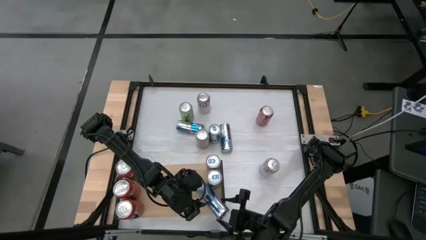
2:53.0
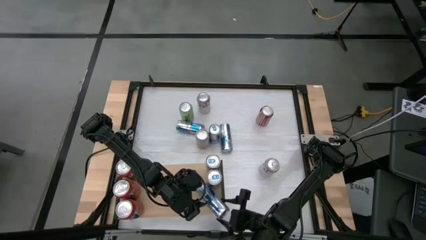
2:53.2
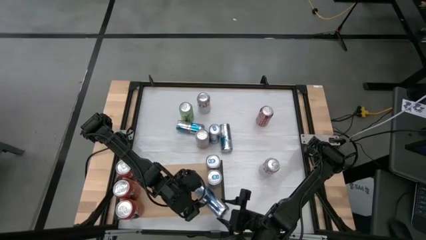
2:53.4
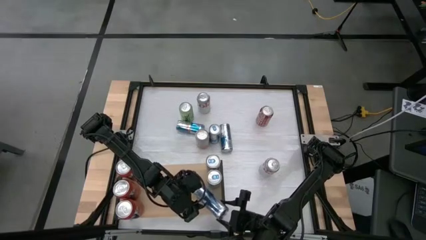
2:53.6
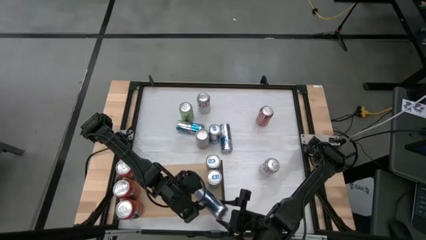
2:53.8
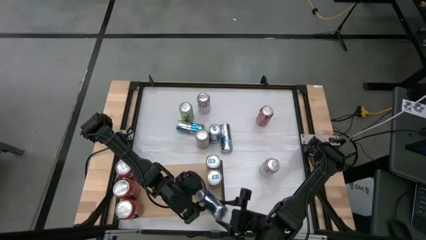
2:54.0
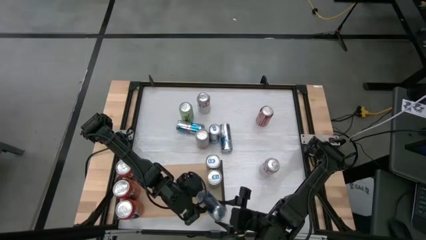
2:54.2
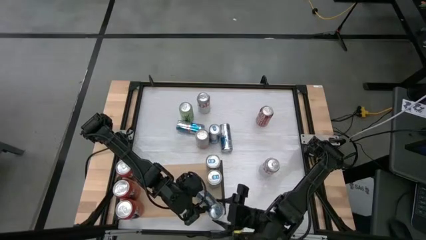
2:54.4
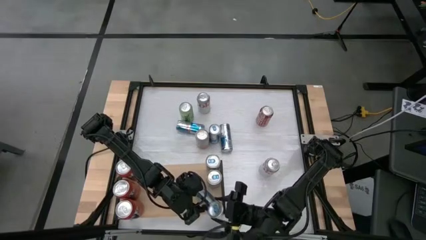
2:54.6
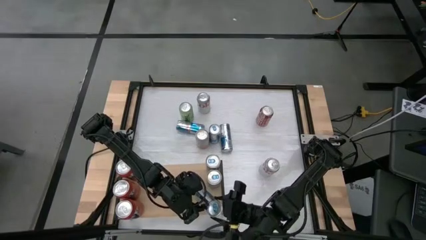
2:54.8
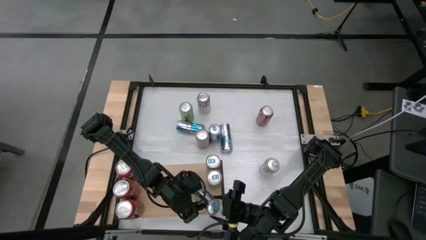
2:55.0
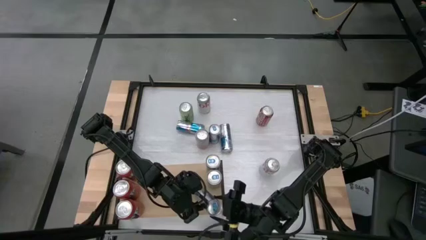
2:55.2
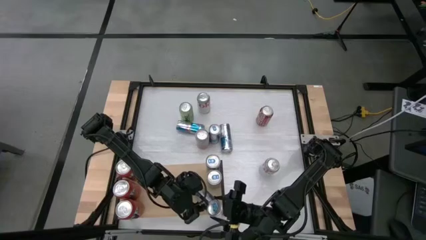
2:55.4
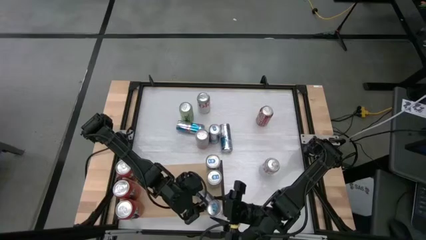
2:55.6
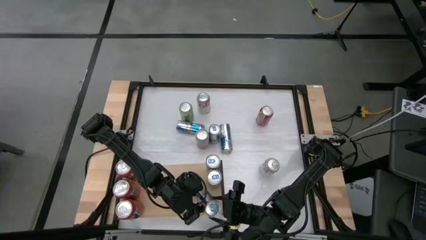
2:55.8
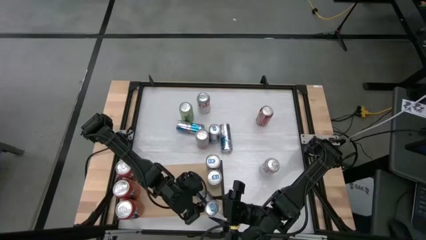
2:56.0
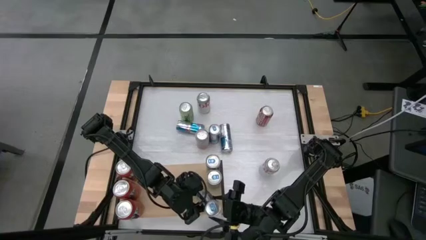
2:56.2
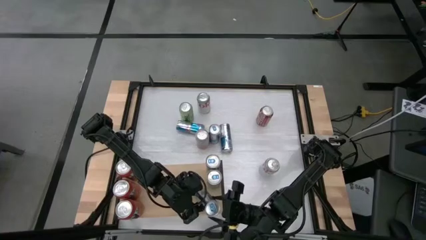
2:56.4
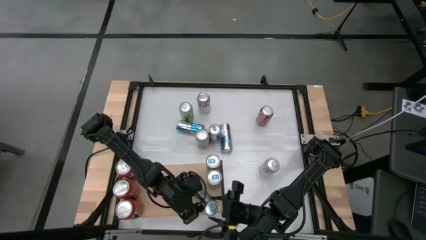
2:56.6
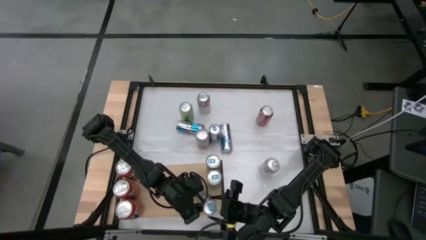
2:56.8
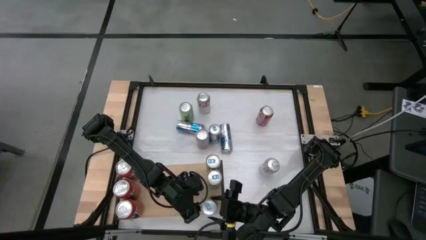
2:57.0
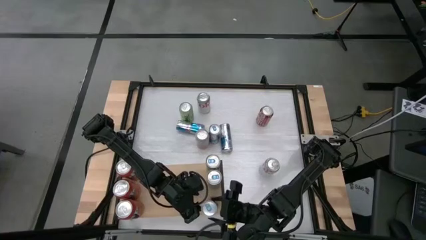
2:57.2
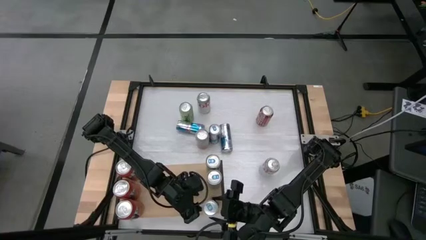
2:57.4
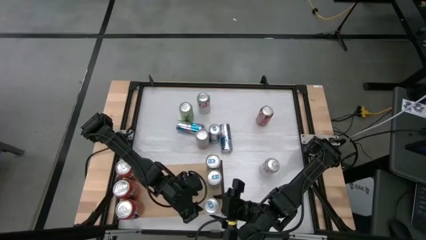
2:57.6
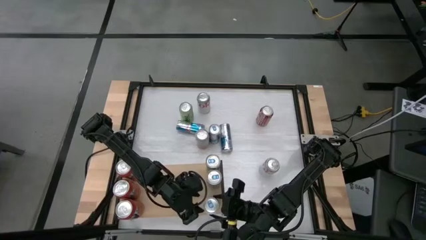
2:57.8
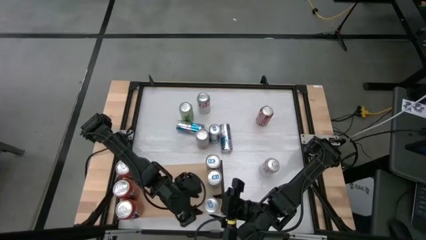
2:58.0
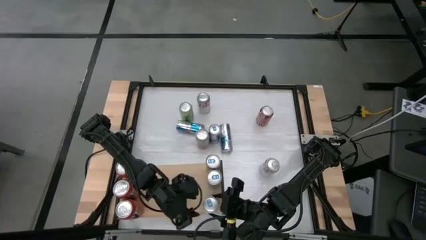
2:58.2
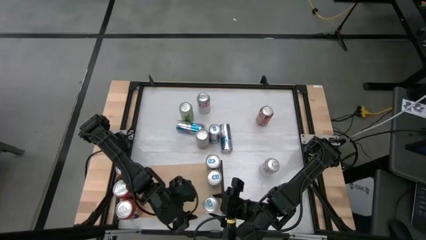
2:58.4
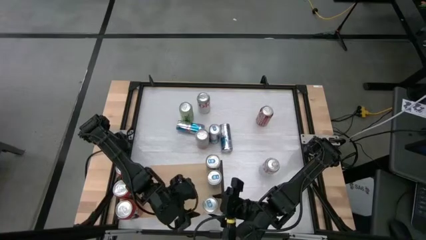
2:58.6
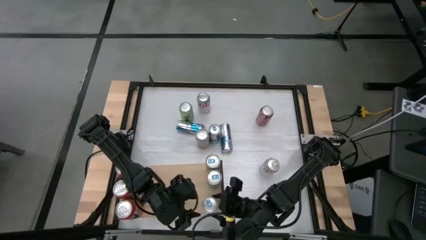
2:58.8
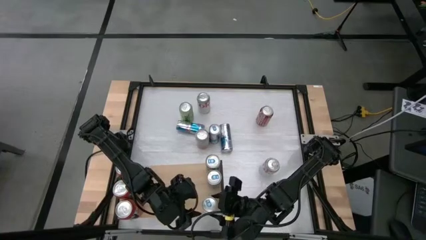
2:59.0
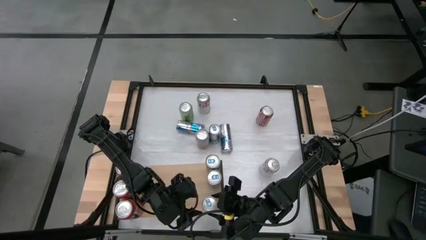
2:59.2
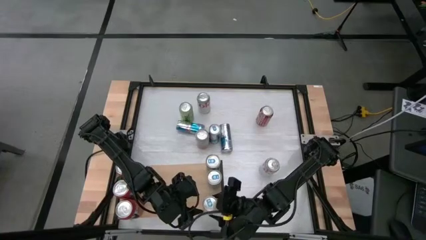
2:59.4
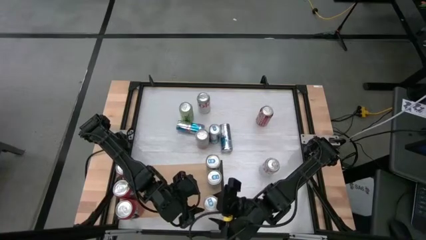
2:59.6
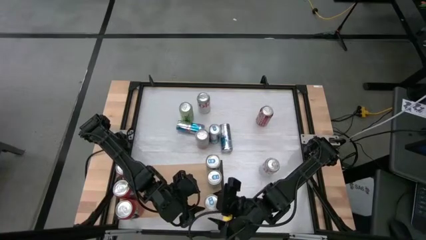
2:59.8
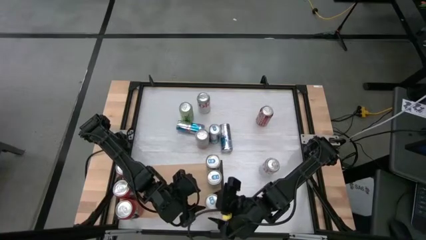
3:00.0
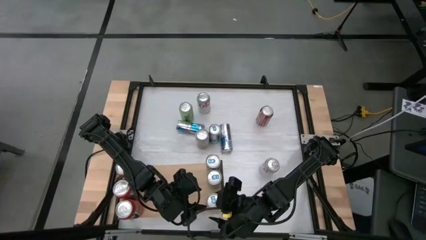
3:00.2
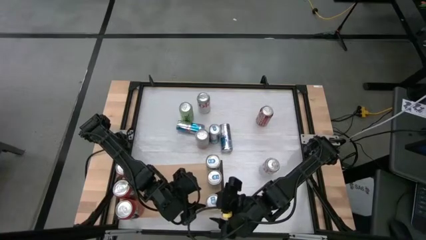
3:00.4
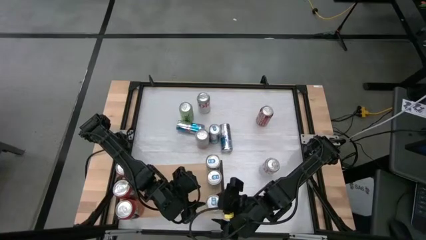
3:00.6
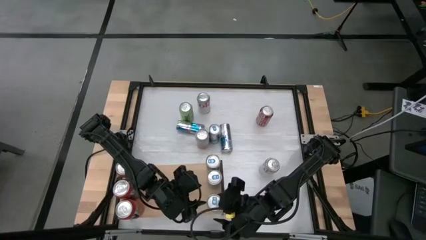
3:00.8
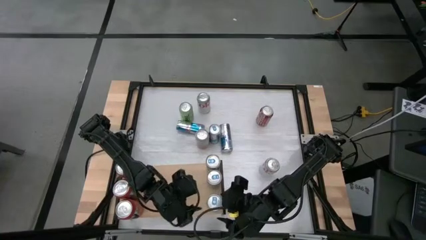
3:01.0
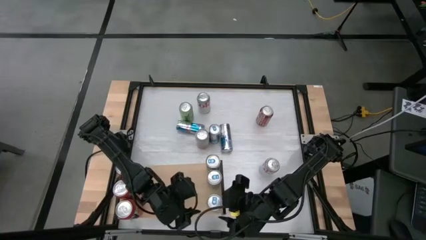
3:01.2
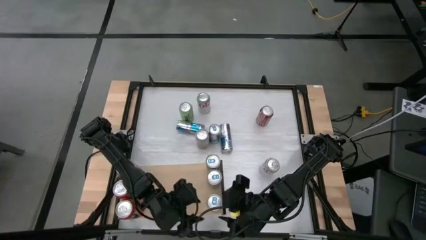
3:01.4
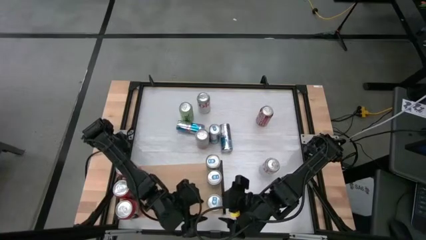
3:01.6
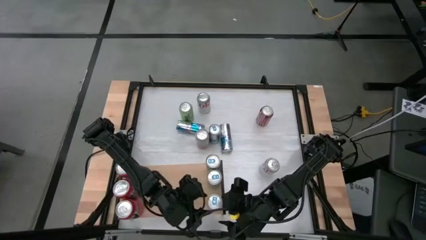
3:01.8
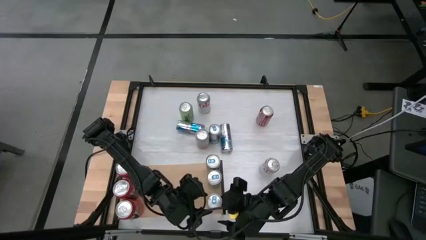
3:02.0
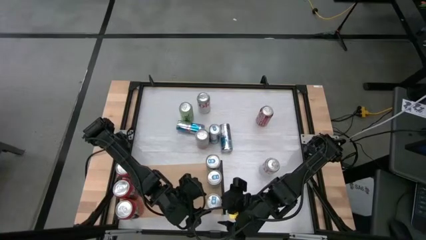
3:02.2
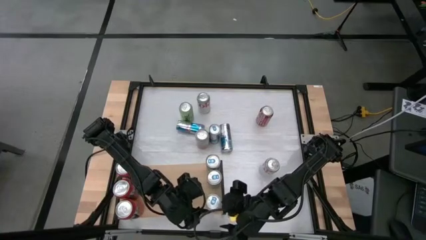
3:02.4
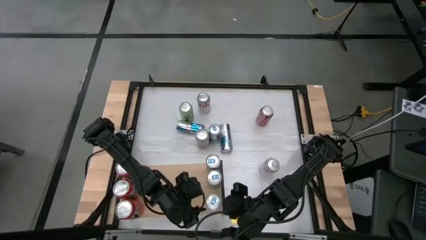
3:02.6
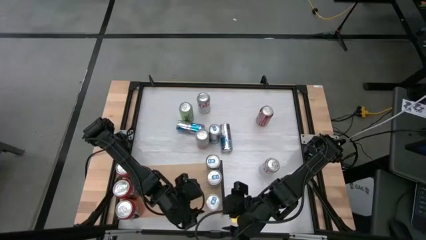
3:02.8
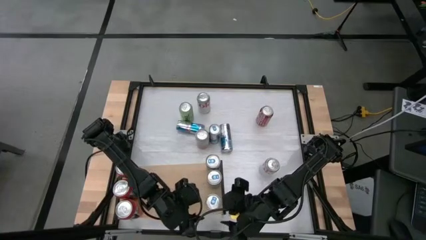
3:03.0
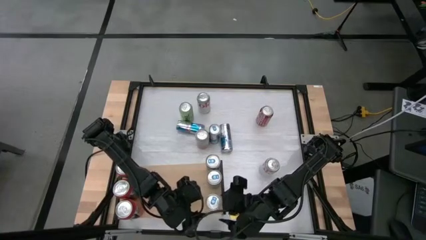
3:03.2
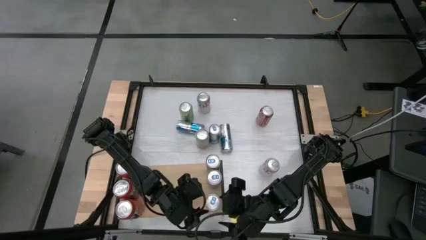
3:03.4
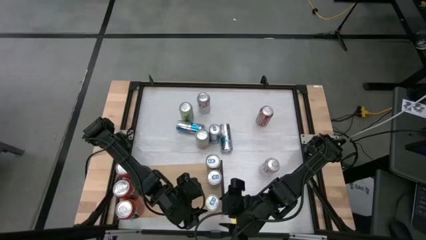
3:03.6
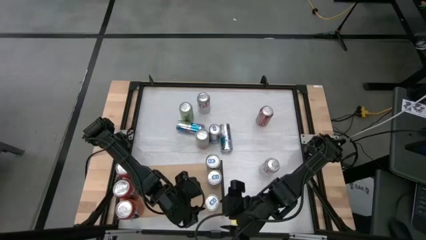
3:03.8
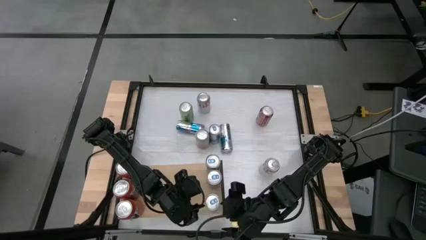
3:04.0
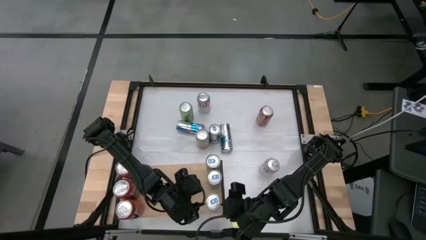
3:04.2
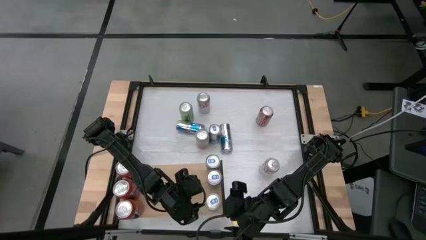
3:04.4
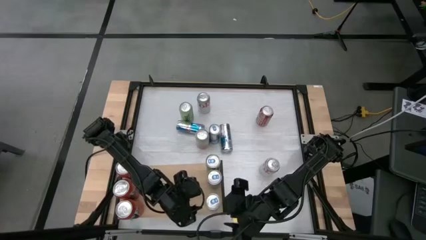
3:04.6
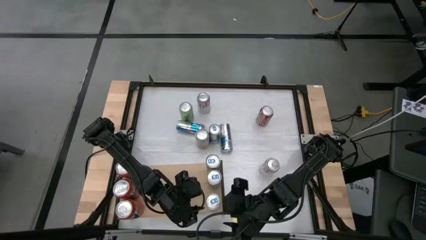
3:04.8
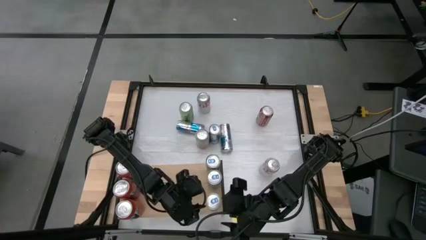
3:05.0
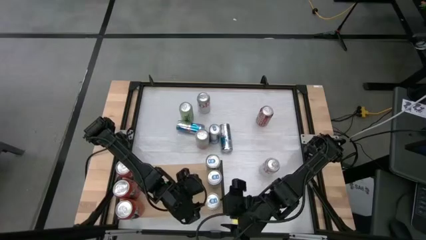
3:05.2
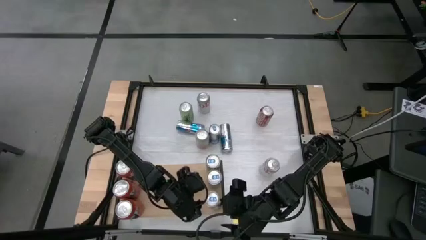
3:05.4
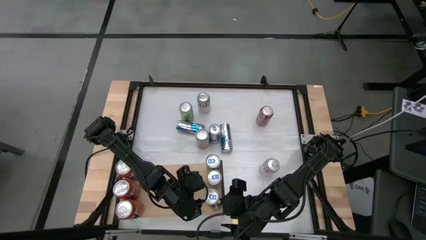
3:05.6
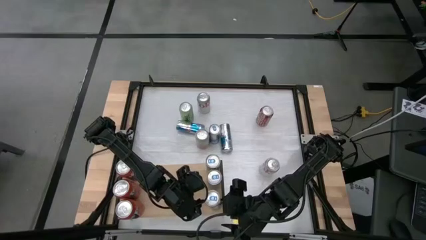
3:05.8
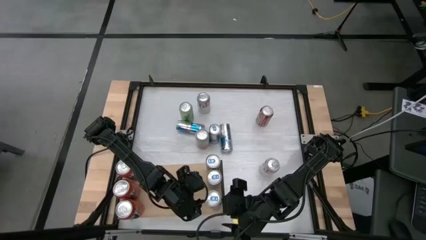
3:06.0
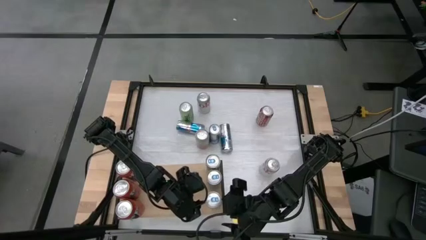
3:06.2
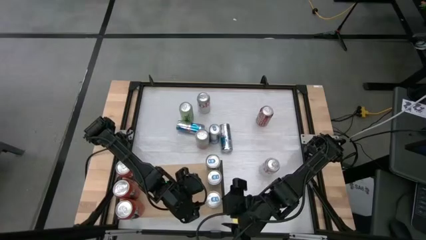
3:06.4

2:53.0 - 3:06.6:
Task: Place canned beverage on shelf
Put the blue soda can on the shelf aligned with the blue soda cans

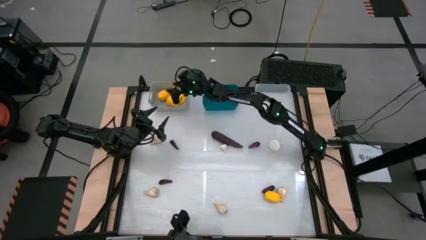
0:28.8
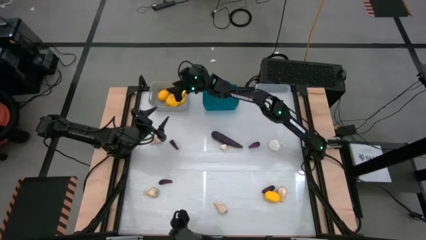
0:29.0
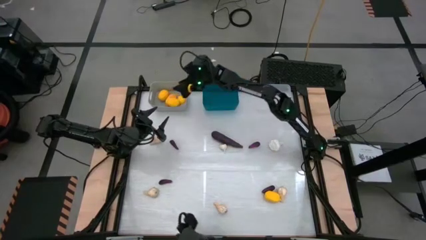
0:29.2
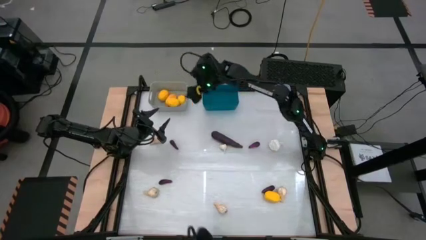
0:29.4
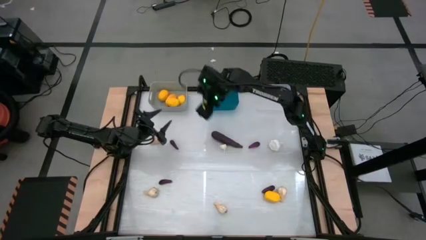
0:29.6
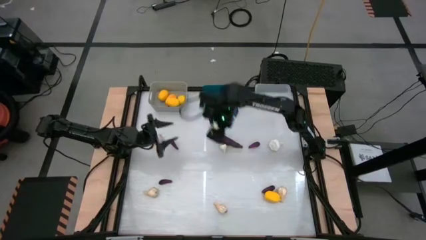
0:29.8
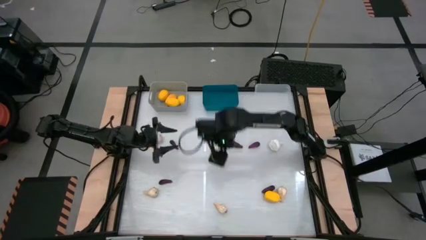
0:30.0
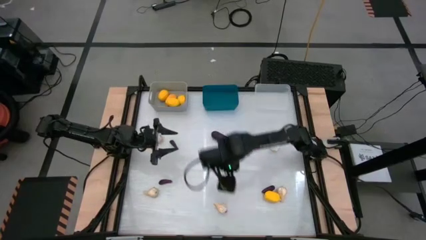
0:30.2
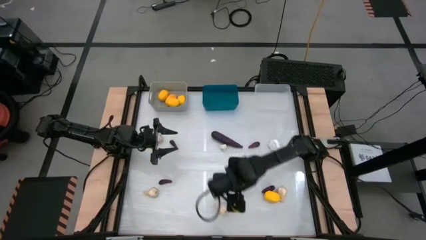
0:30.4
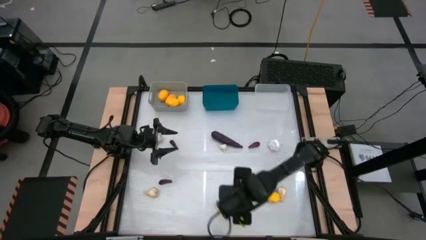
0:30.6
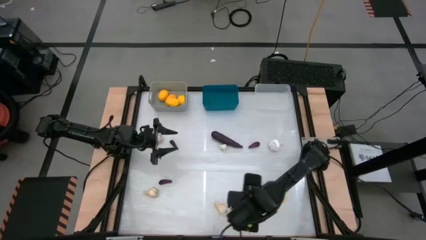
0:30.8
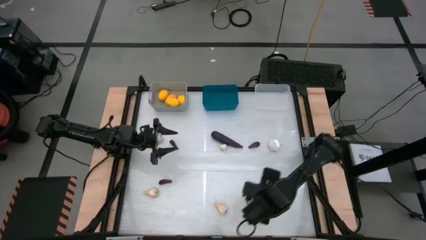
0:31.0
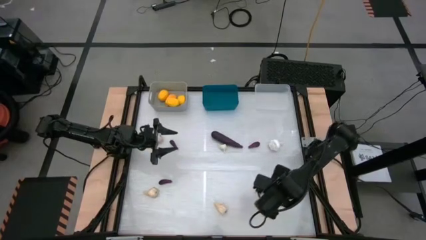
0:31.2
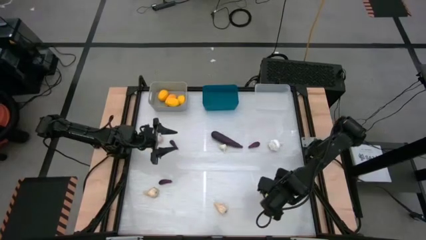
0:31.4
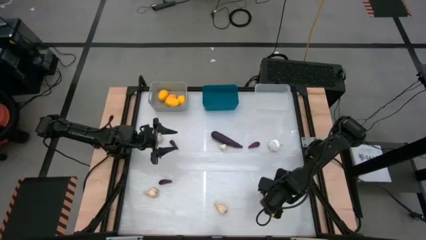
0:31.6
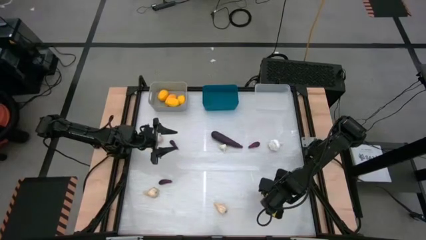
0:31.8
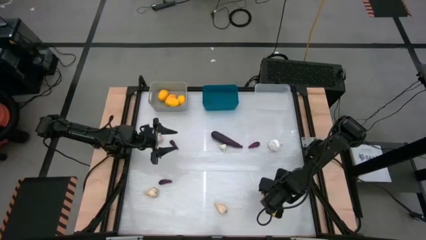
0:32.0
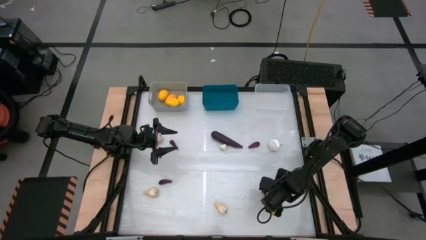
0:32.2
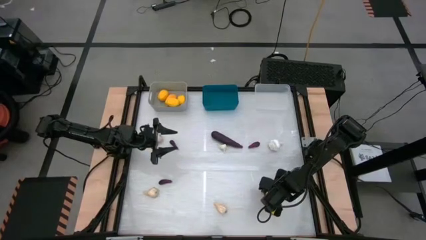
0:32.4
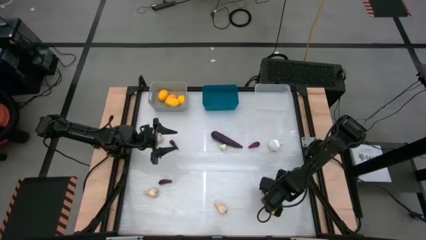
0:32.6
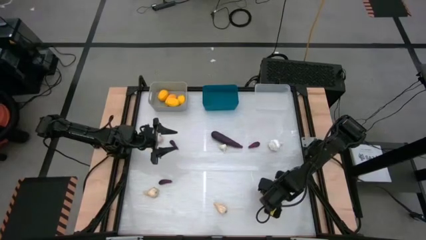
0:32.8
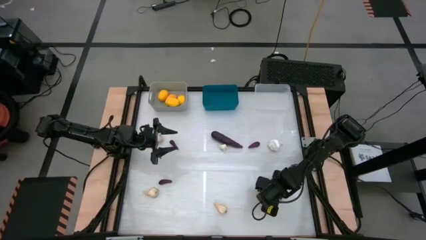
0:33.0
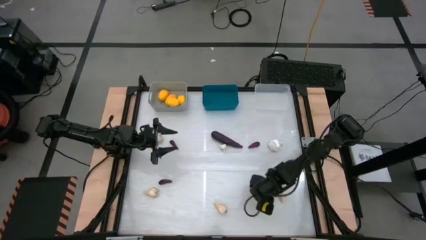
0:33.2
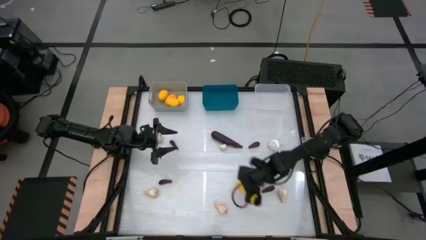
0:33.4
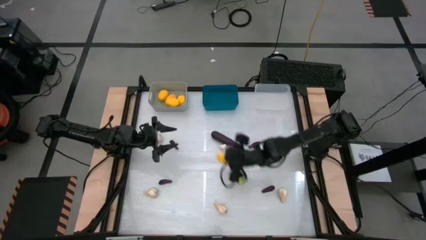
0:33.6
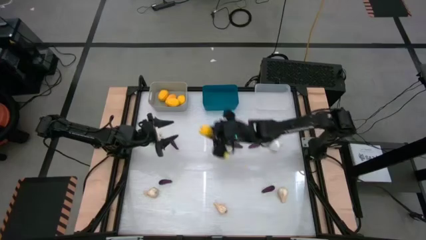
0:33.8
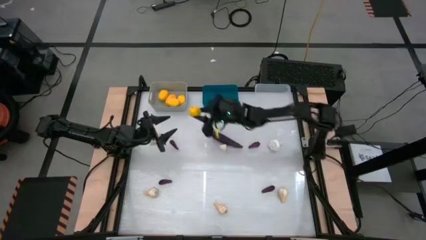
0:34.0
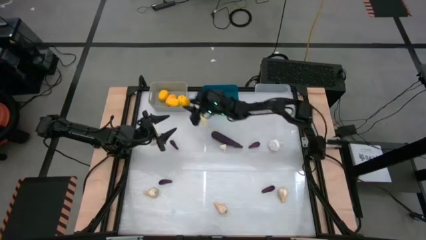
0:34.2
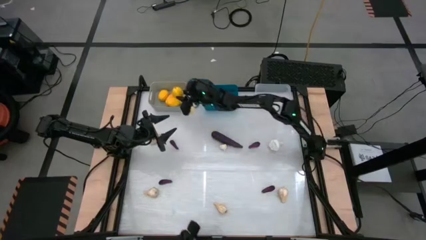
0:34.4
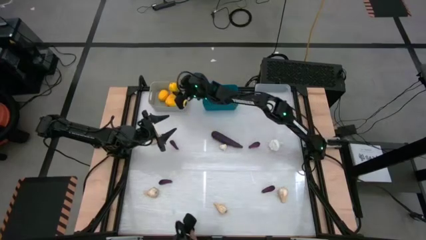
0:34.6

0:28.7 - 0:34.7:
Task: Sort produce into baskets
Put the lemon into the gray bin
